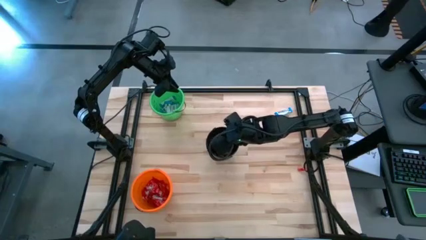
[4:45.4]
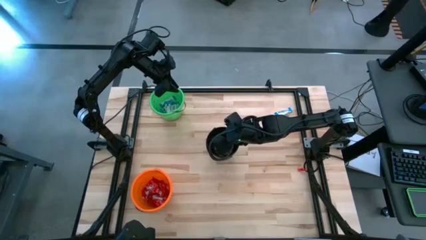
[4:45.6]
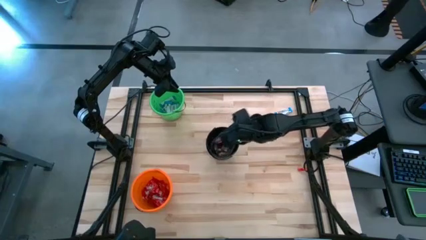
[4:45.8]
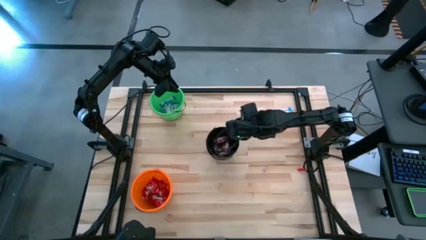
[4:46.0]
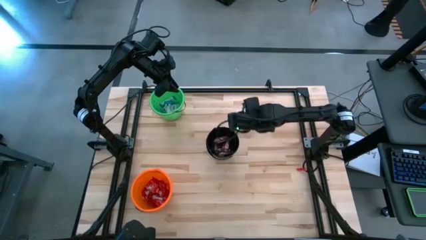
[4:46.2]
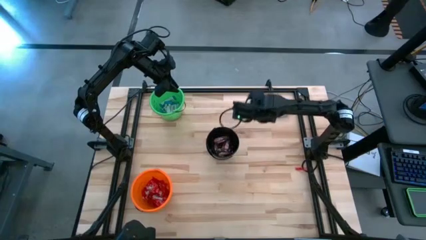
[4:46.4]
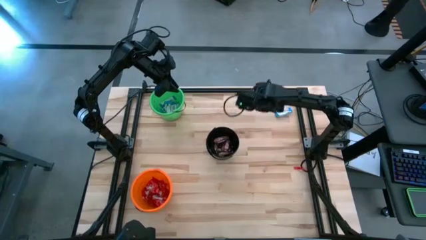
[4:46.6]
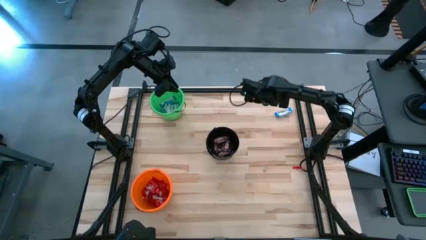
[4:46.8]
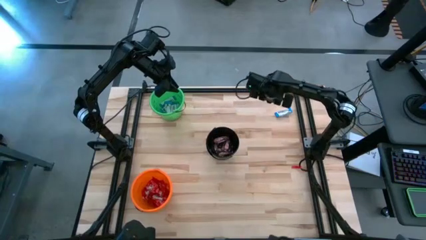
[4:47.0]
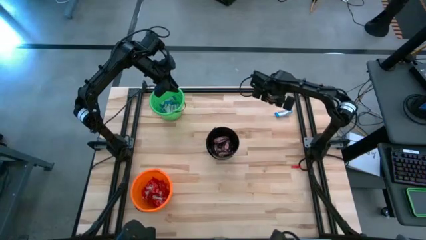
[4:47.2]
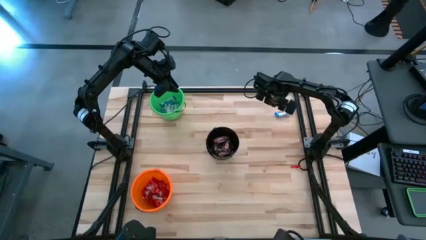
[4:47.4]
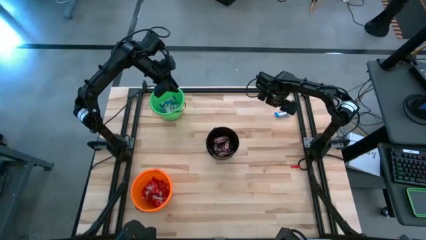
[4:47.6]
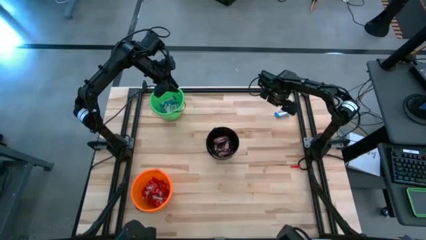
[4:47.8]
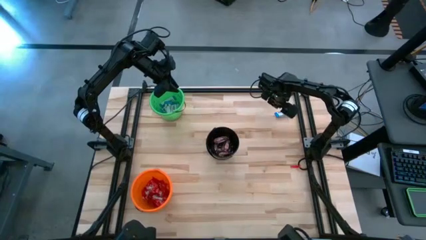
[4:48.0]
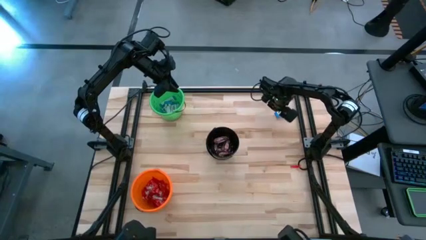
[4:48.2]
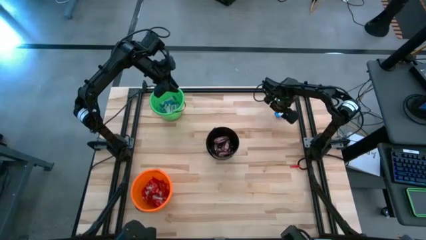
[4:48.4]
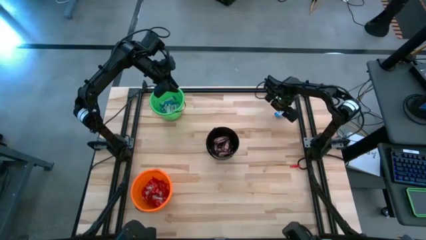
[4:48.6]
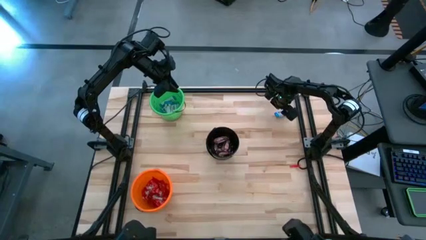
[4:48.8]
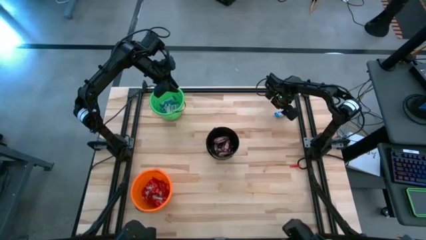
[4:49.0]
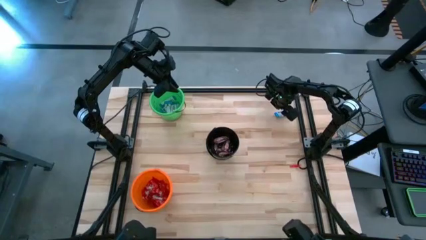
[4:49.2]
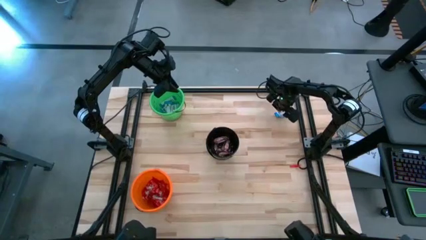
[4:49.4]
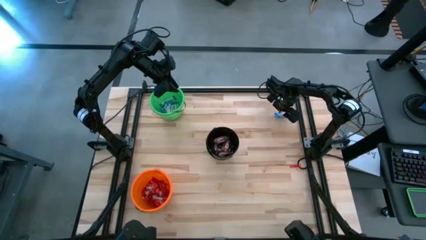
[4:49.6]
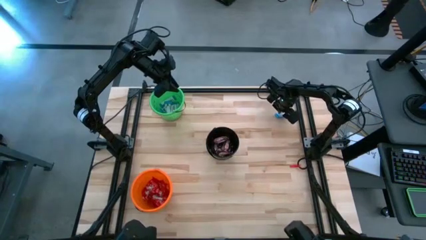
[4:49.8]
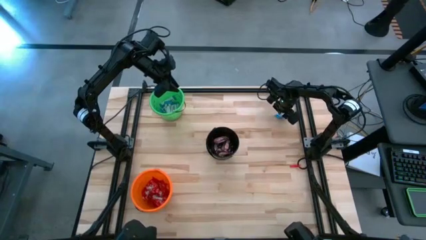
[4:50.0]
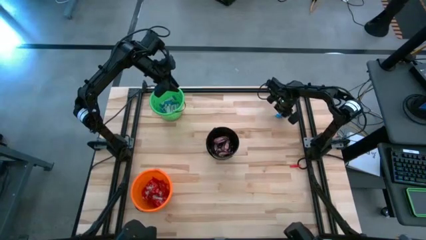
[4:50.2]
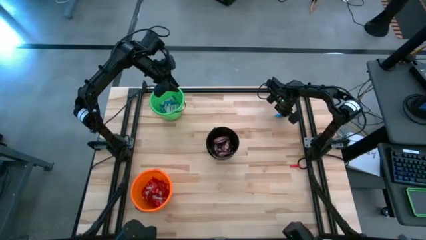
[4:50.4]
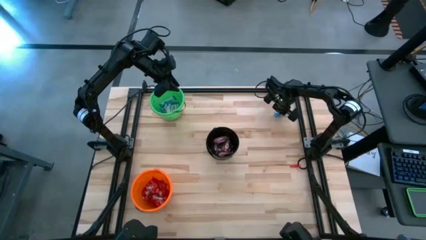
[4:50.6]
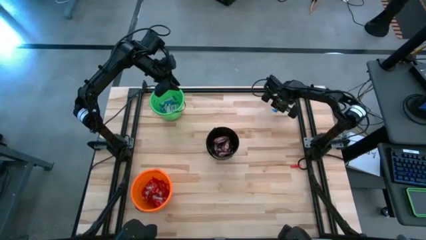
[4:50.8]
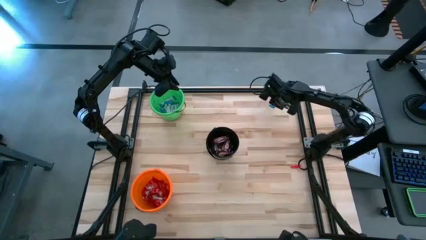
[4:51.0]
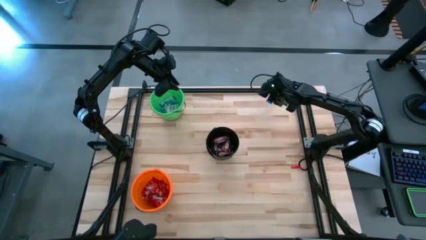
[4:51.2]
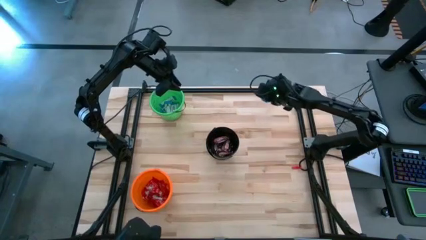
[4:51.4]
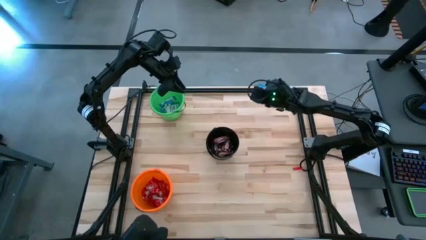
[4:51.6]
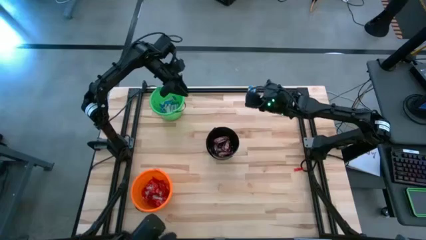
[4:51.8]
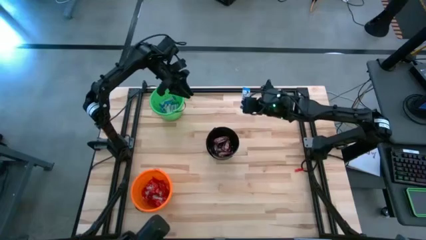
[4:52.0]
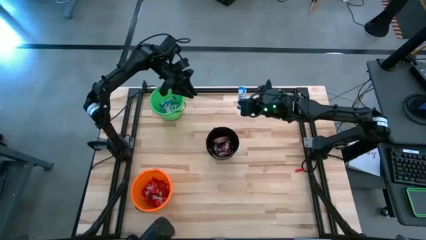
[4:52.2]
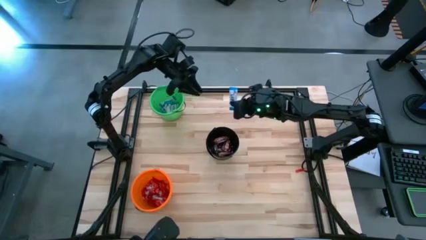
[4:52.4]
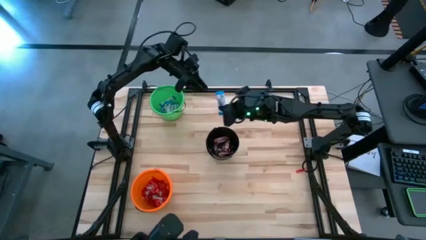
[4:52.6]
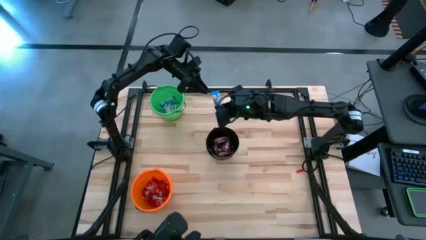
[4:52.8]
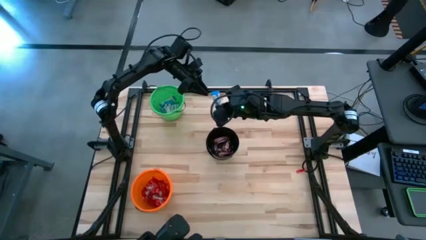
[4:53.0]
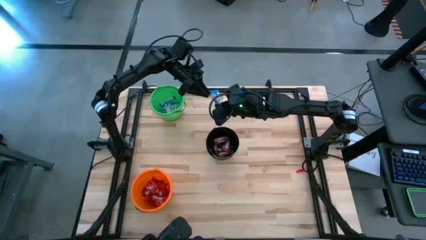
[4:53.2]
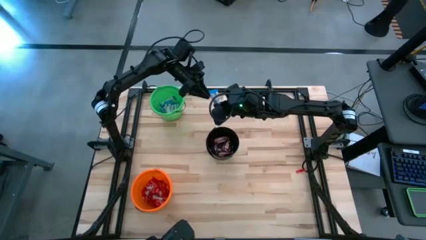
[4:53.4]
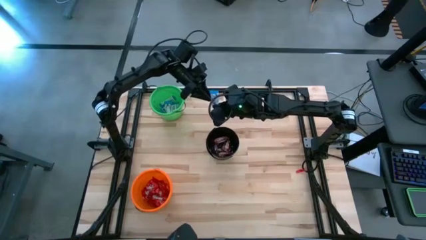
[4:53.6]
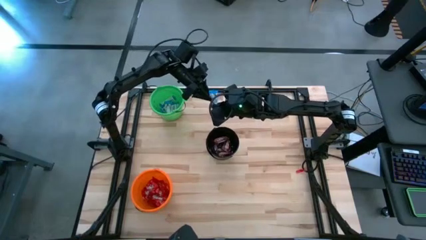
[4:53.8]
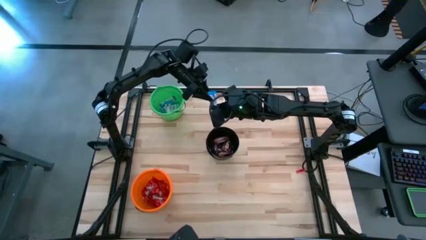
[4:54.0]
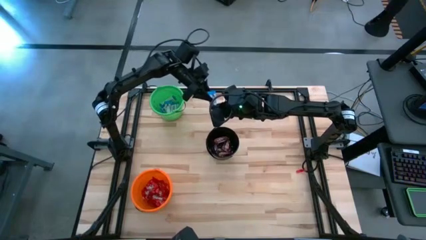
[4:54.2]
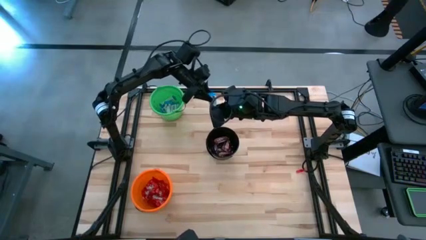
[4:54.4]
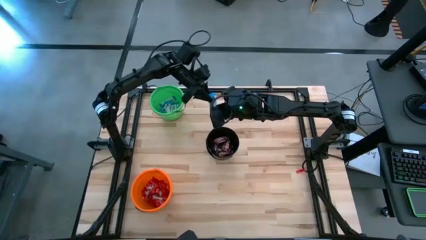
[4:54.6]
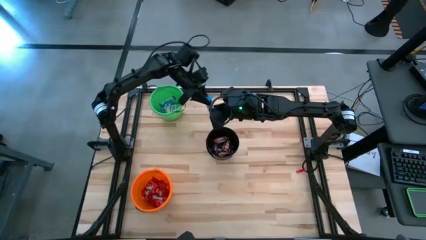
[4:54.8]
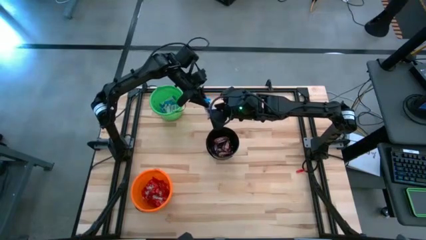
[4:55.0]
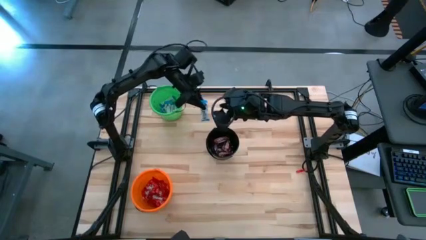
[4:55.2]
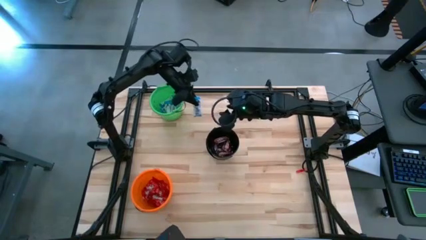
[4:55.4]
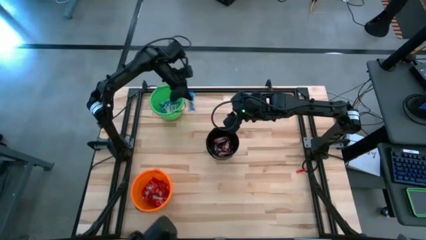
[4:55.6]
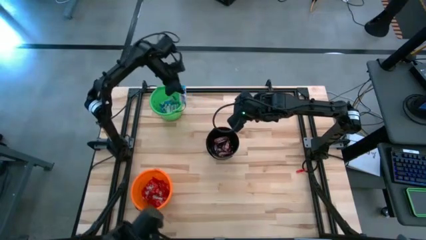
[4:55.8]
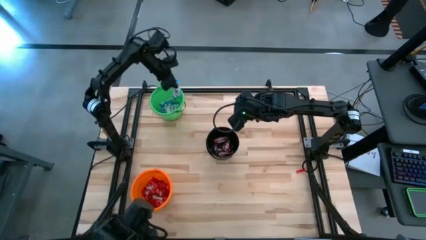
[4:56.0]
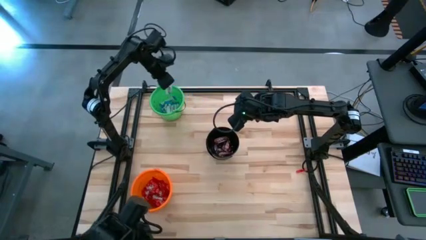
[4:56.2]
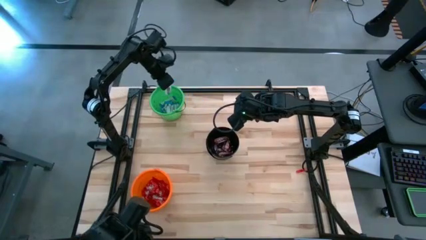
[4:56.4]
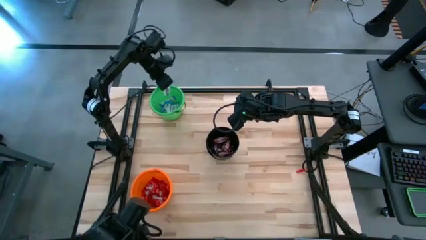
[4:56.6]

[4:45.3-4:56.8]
Task: Sort candy
Put the white chocolate into the green bucket

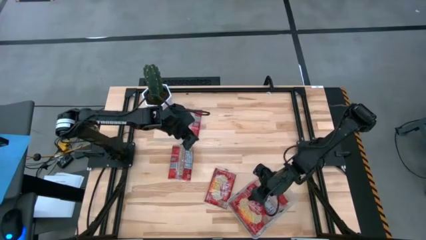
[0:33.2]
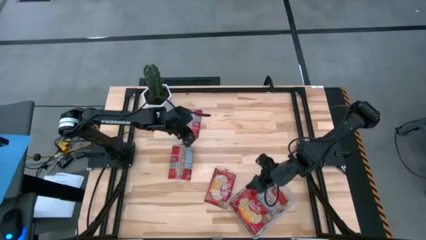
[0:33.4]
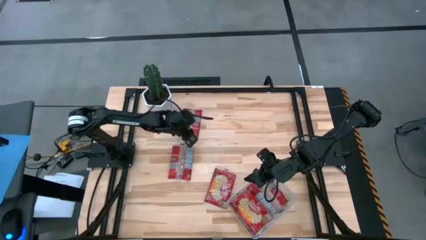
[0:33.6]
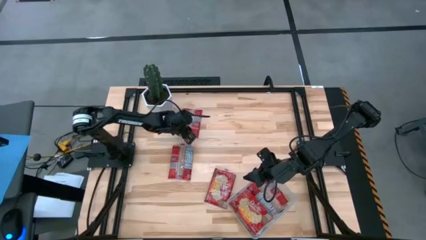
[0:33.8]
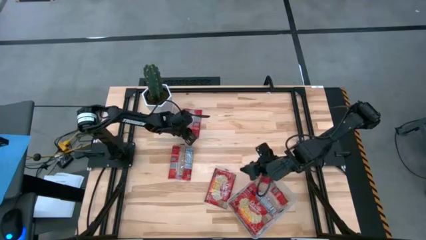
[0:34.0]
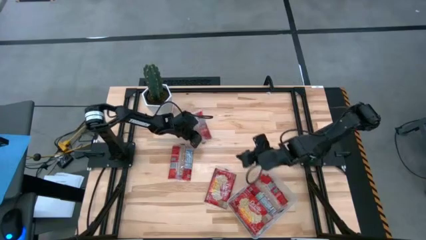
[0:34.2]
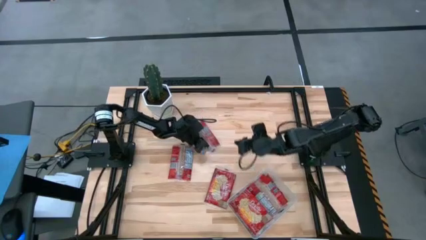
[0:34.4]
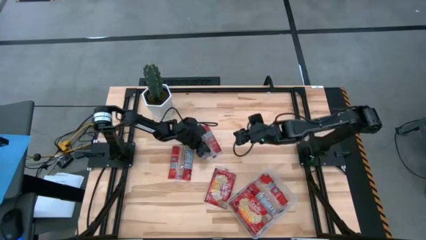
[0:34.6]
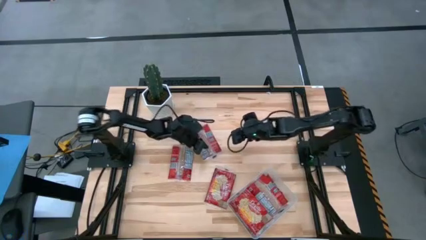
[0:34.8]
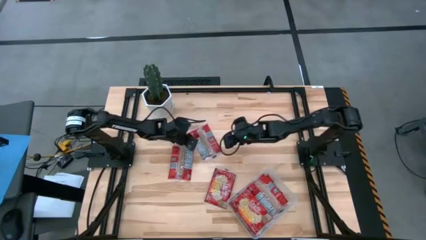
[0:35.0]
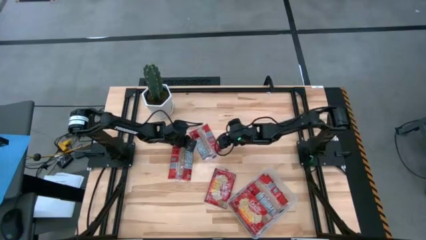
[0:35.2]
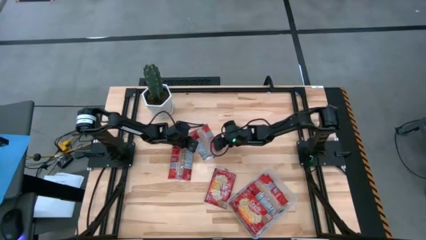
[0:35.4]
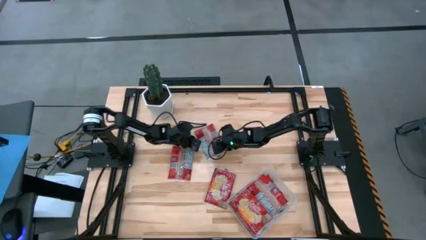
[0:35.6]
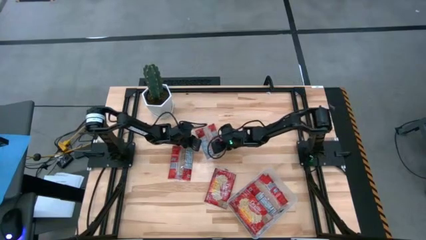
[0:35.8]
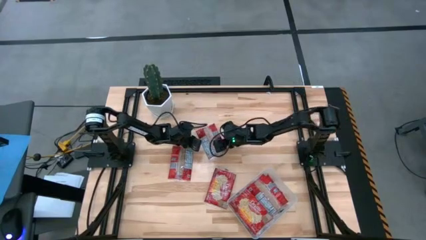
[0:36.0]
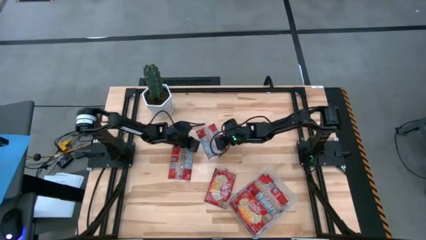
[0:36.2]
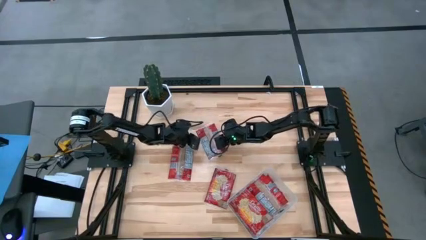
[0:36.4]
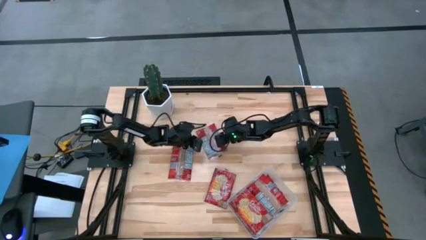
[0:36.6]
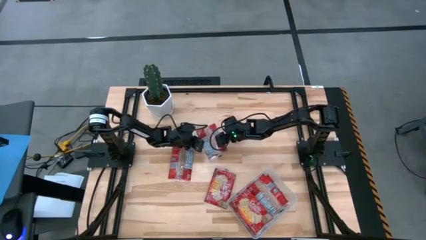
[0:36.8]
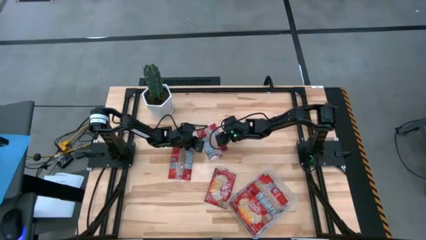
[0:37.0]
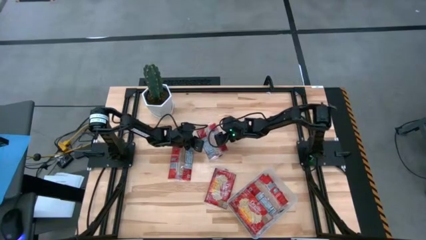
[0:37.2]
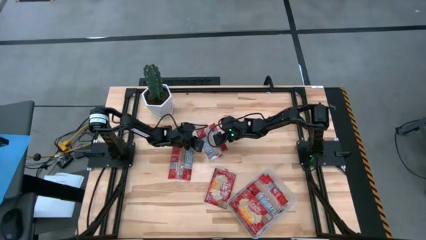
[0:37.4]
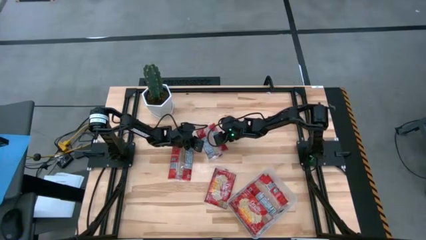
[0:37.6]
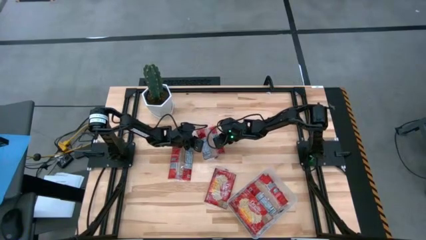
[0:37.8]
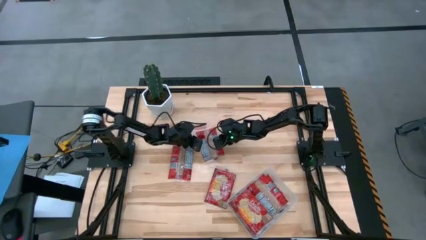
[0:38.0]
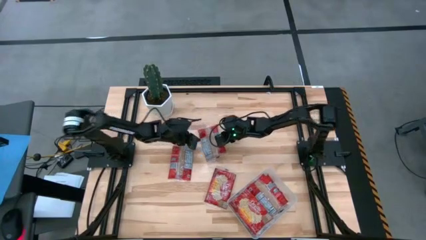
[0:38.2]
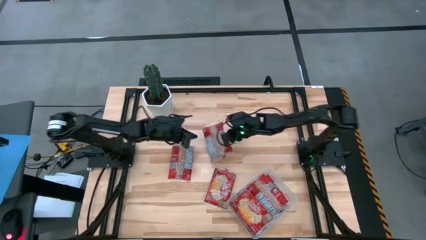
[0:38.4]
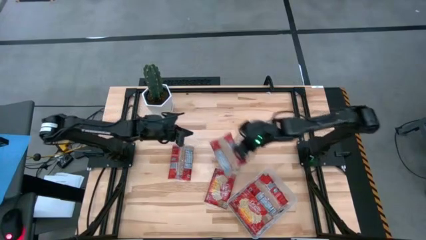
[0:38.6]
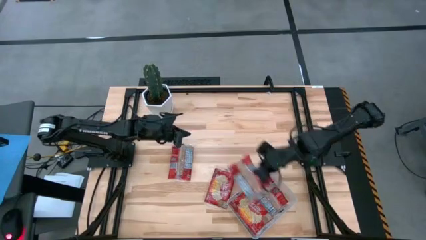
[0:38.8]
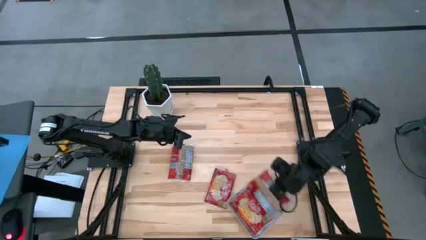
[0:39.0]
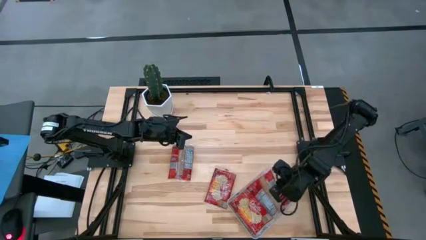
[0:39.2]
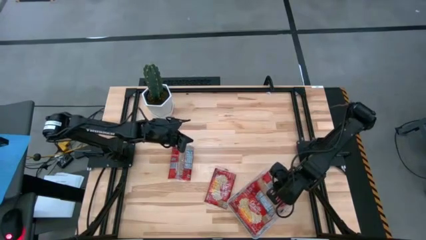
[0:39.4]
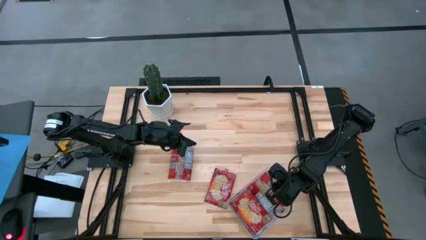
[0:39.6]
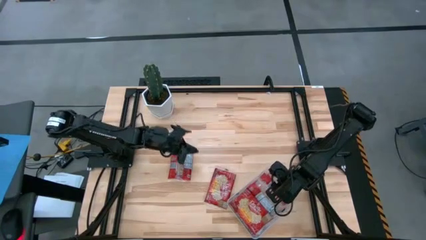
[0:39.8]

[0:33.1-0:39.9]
Task: Sort popcorn bags into baskets
Put the top red popcorn bag into the transparent container
